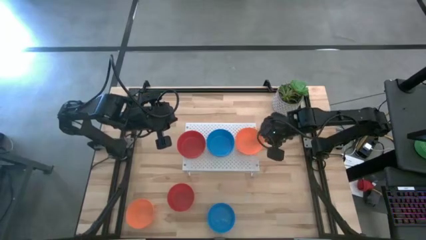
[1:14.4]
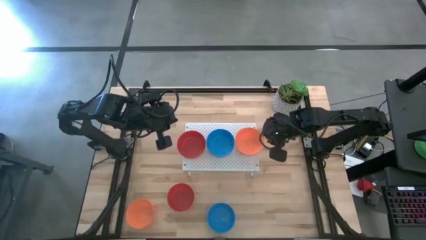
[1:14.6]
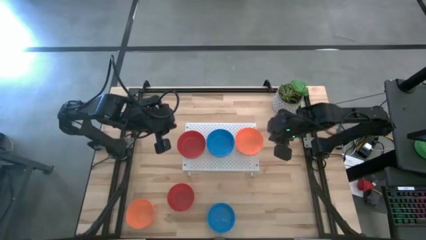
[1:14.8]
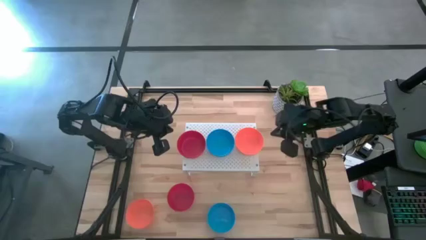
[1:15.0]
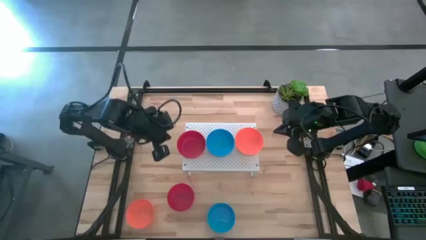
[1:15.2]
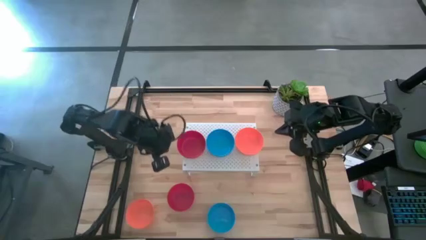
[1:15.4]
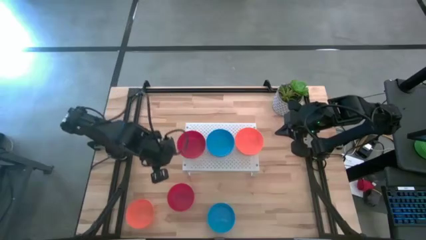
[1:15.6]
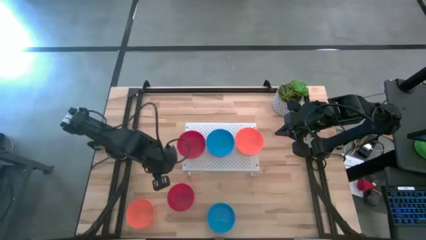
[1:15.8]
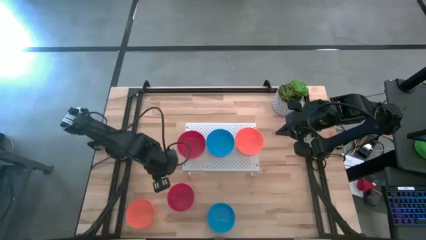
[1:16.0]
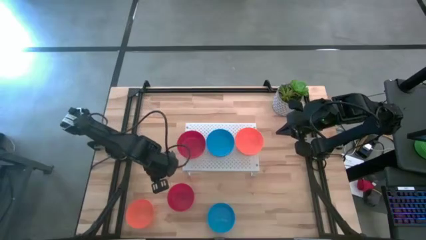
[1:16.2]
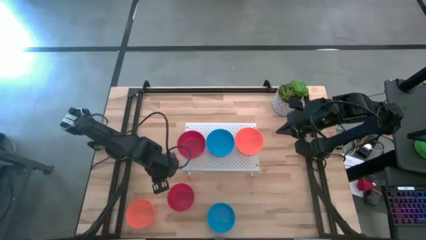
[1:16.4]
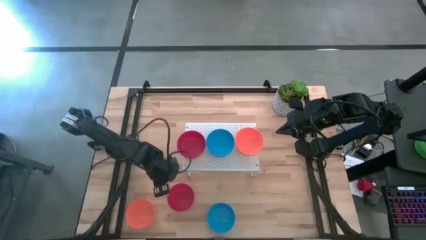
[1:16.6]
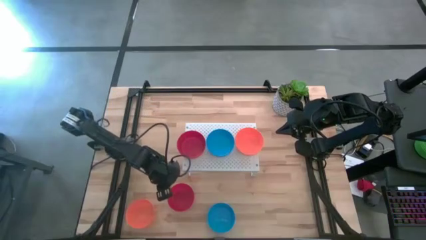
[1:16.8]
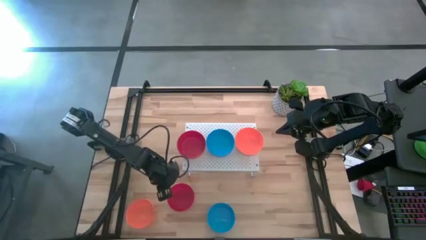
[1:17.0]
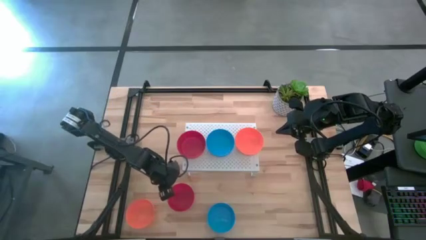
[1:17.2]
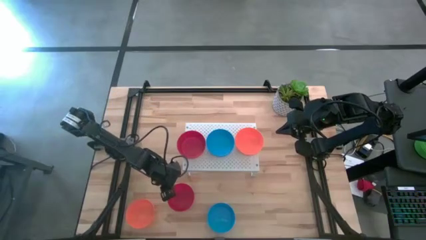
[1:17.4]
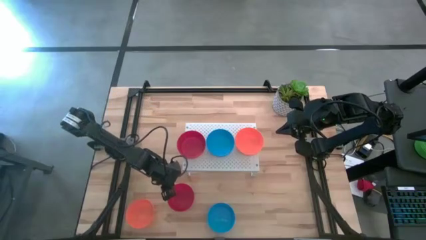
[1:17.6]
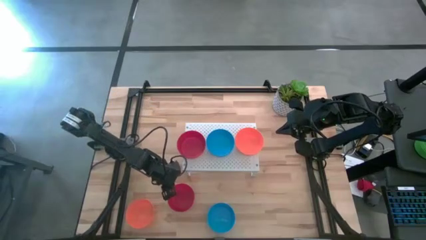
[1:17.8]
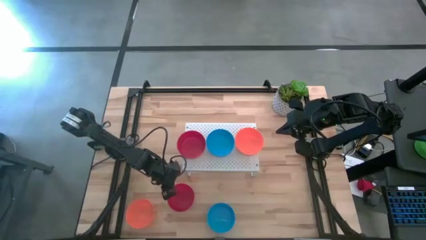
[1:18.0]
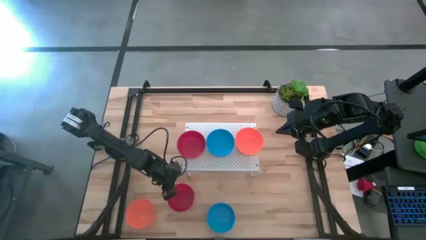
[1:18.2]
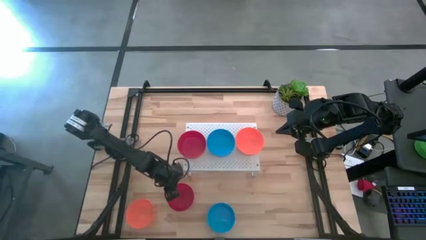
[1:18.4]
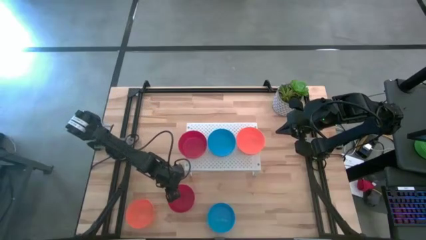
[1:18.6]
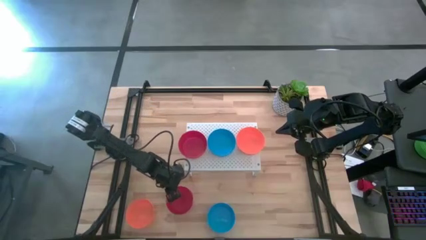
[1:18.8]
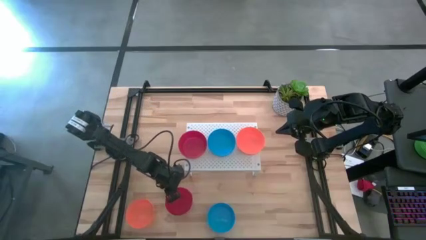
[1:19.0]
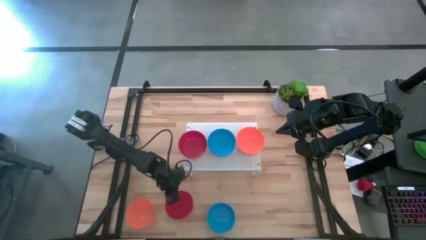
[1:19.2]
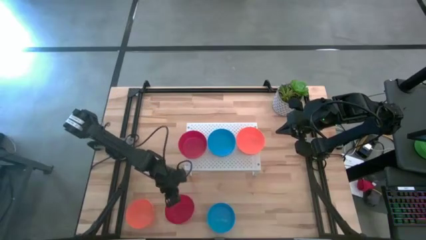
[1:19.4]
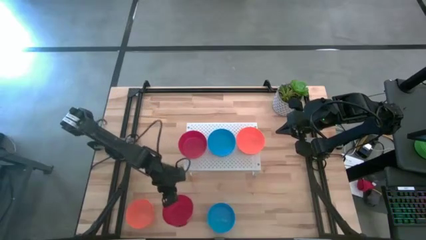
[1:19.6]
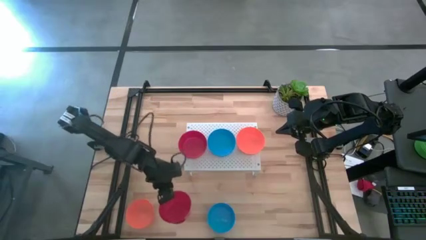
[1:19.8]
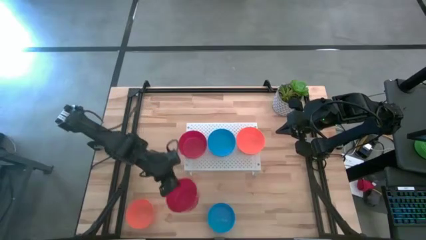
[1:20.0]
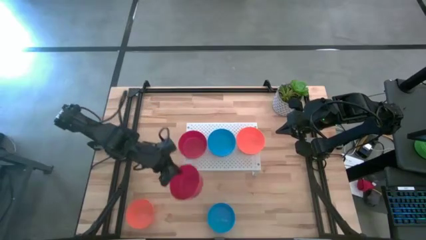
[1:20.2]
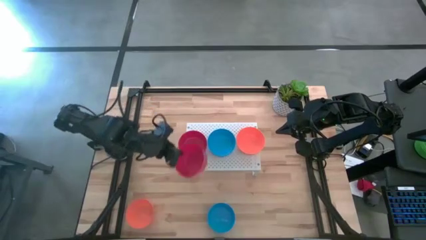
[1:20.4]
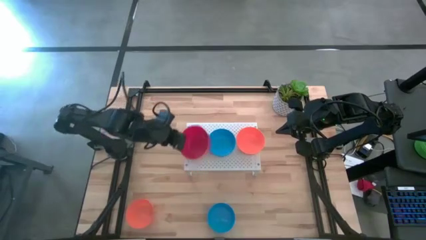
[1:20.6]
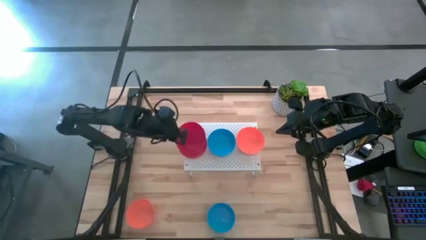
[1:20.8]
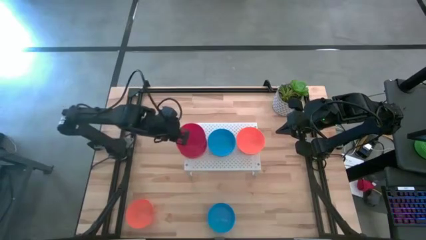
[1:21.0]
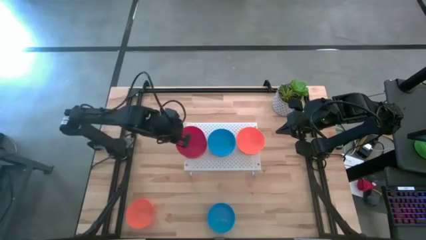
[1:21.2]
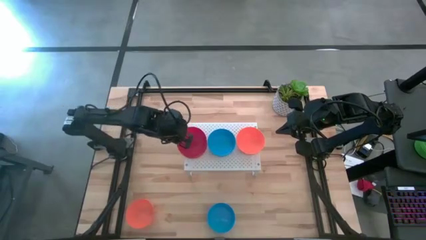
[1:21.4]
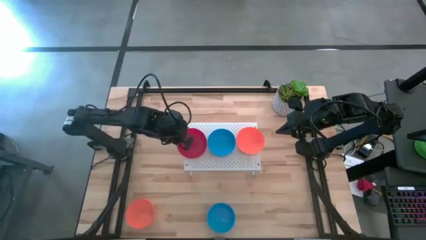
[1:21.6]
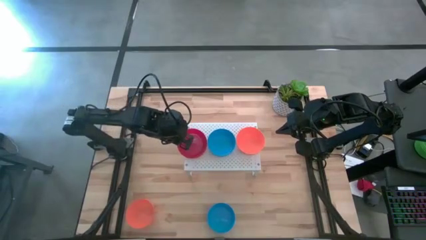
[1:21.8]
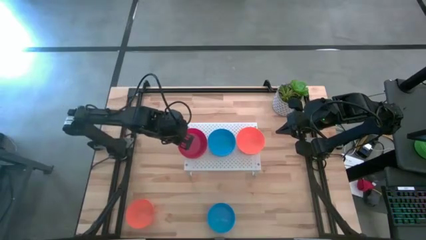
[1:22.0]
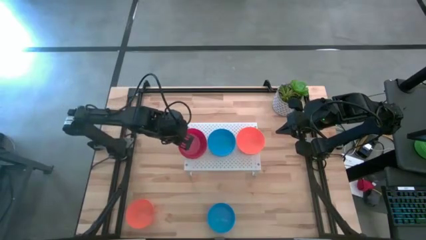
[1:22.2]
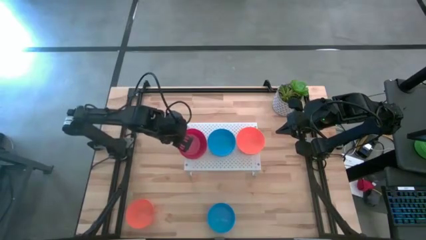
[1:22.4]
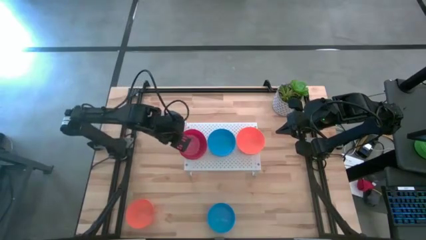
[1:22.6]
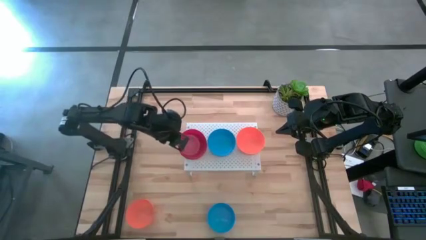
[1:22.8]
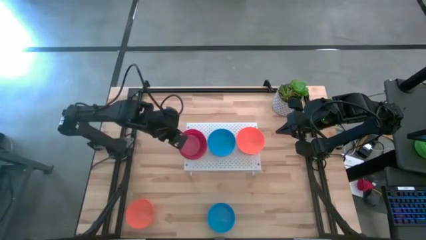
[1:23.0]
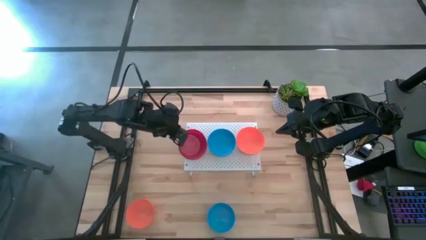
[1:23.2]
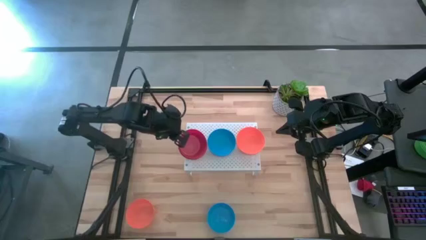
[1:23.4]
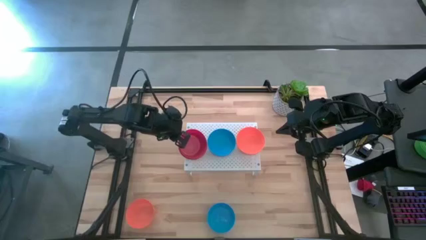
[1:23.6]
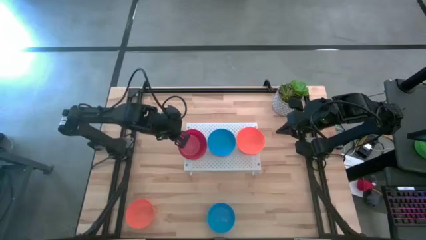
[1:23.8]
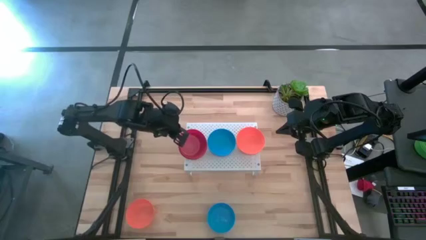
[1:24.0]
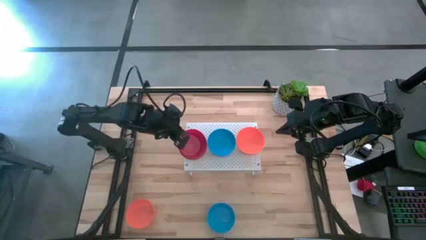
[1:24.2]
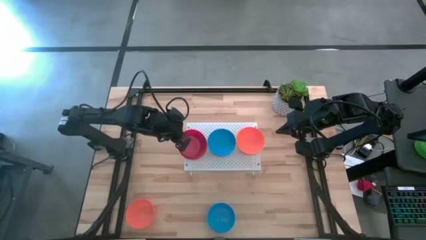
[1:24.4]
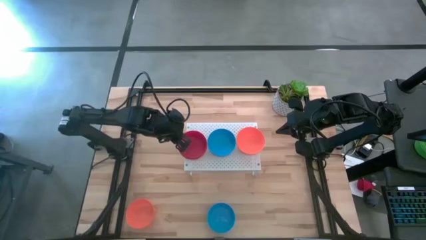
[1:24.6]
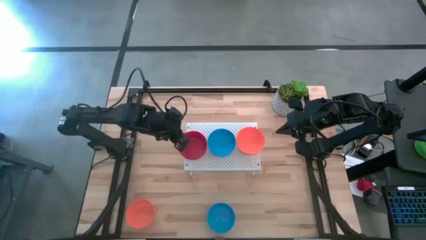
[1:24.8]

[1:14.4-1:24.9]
Task: Pick & Place Mini bowls
Stack the red bowl on the red bowl on the shelf

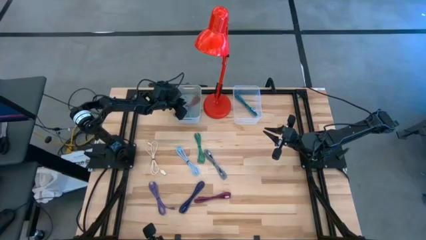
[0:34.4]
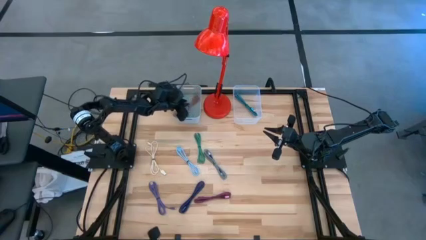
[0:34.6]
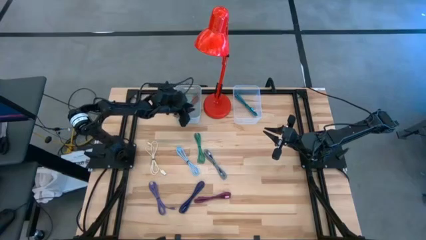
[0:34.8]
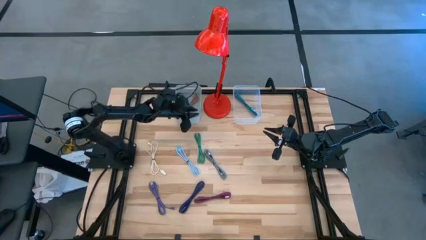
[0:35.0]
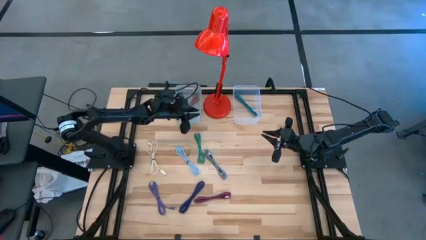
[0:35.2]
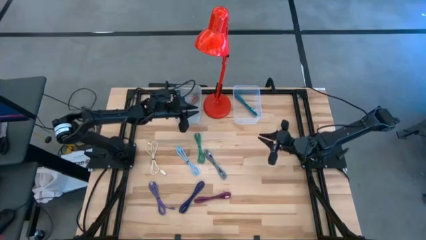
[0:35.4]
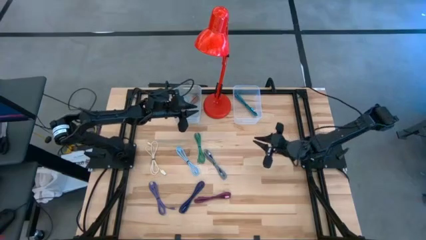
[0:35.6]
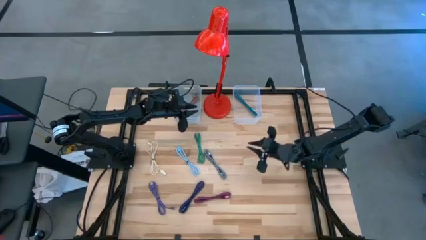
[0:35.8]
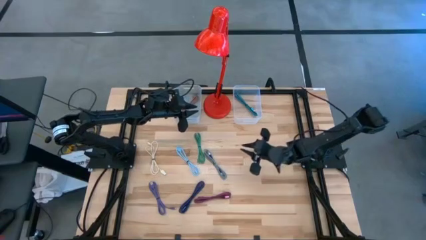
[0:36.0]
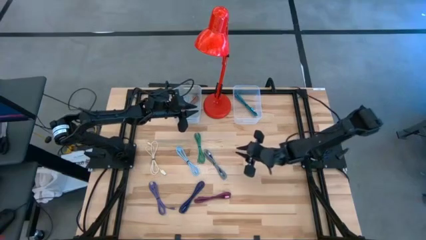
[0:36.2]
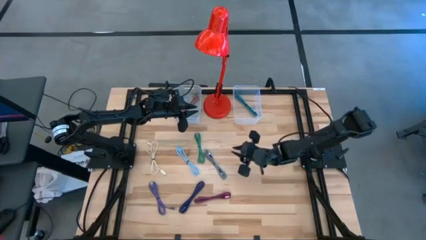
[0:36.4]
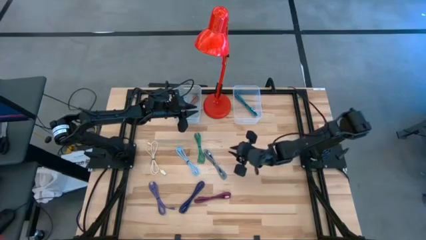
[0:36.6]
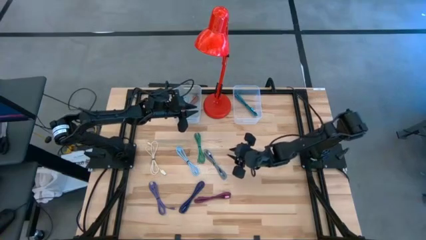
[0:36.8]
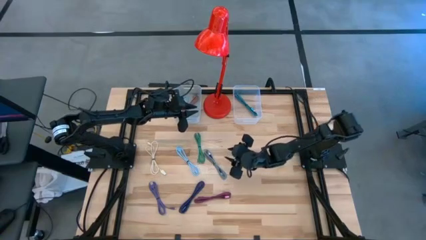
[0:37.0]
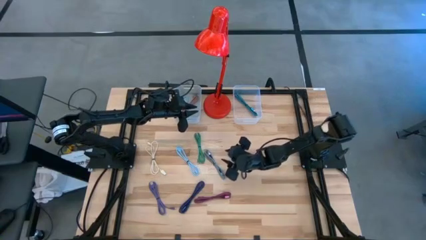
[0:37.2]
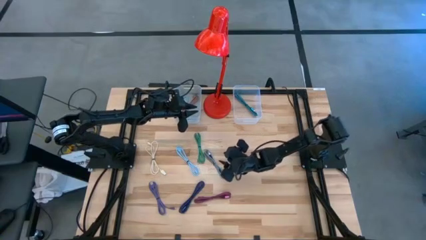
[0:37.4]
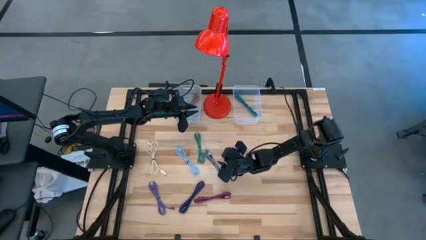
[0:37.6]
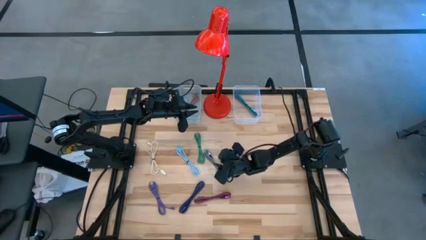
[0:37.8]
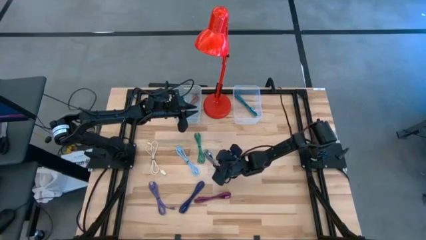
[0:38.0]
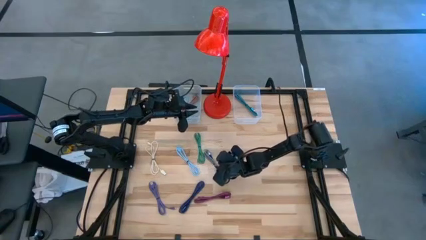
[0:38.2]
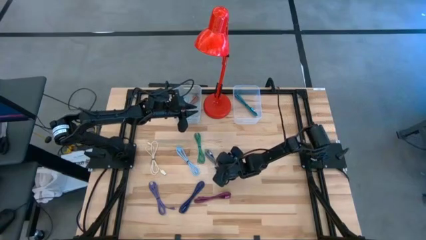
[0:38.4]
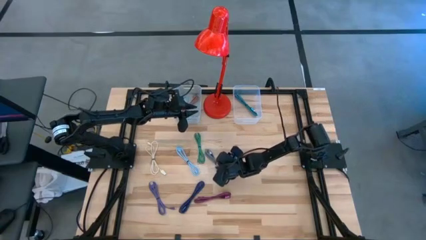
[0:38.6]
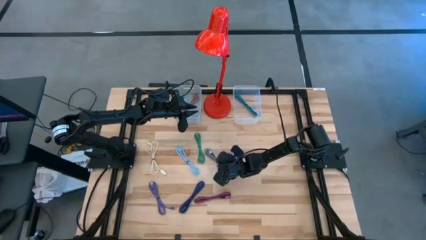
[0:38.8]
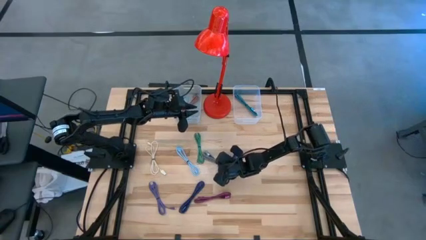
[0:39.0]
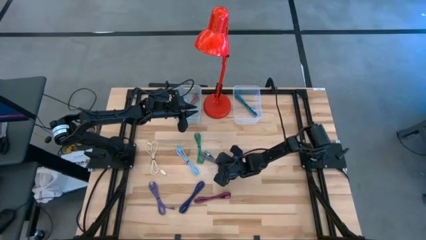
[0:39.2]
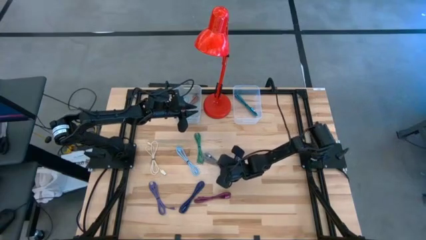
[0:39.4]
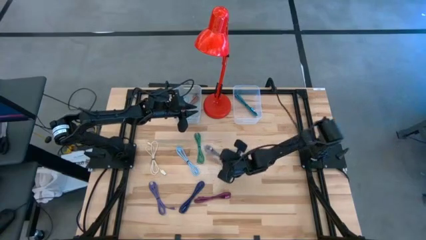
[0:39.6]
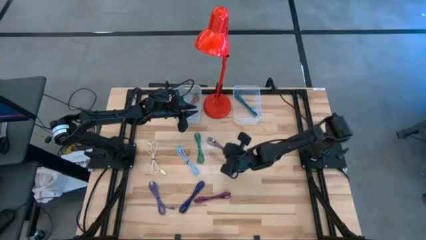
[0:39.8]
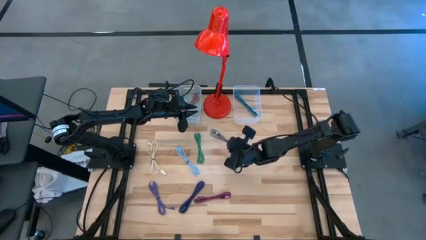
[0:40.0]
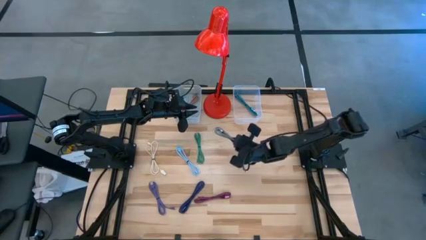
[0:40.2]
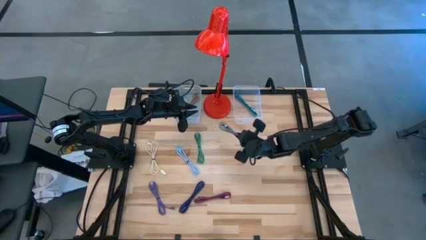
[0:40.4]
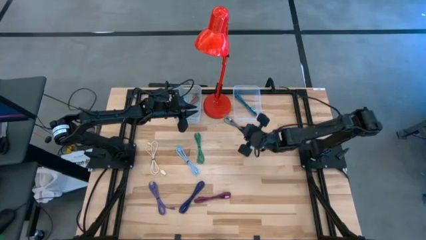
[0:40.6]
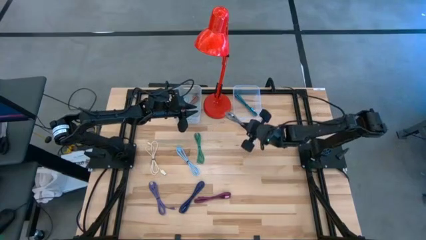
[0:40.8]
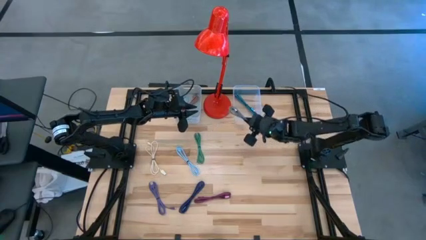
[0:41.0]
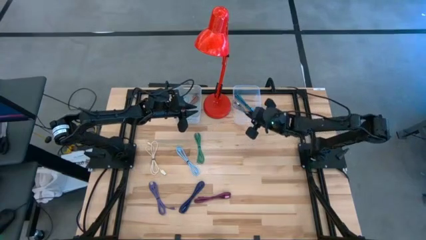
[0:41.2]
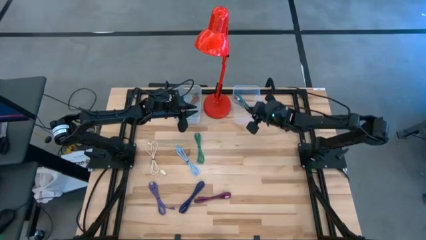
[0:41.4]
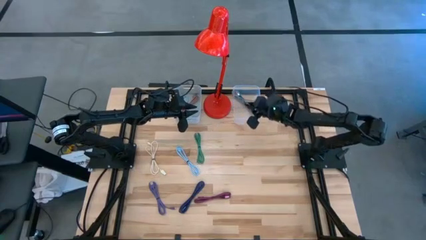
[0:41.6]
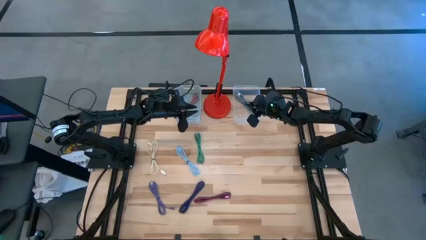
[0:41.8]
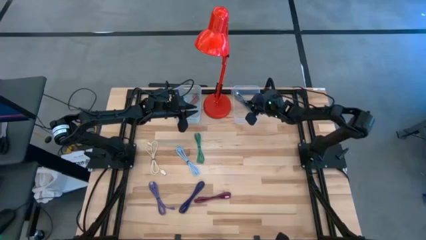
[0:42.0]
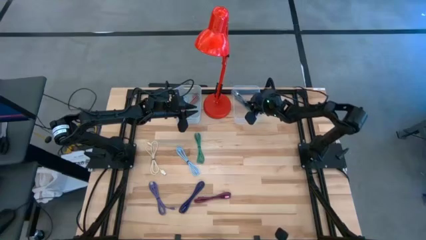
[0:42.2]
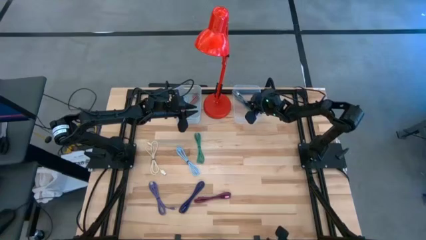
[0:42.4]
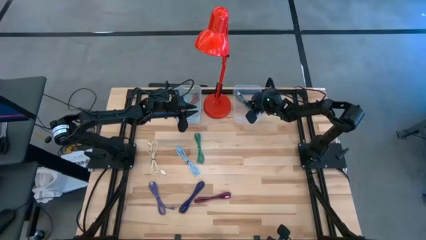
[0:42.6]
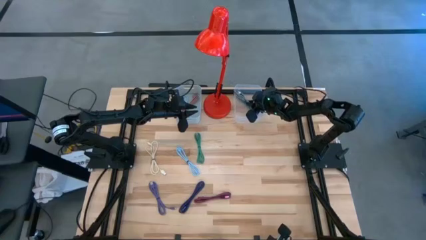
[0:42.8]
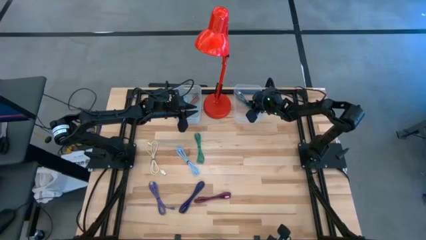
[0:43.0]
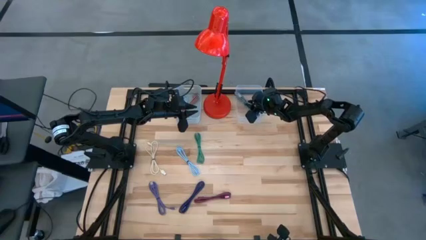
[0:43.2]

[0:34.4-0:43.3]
Task: Pick & Place USB Port
Put the black and white charger cable into the transparent bin
